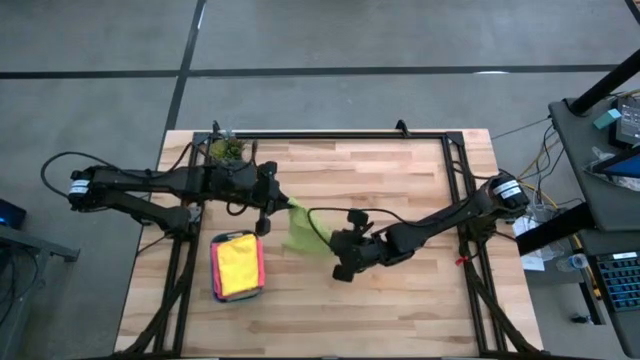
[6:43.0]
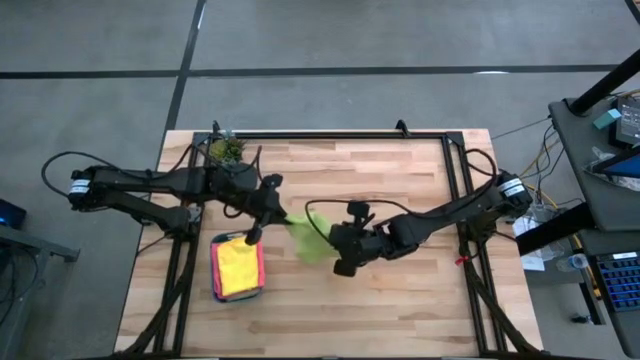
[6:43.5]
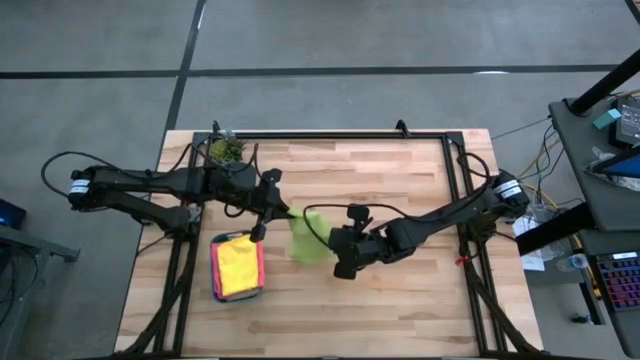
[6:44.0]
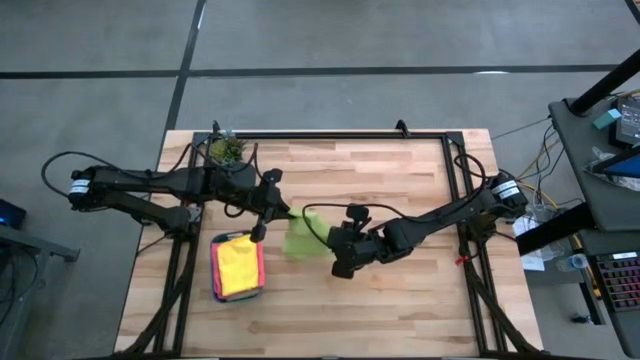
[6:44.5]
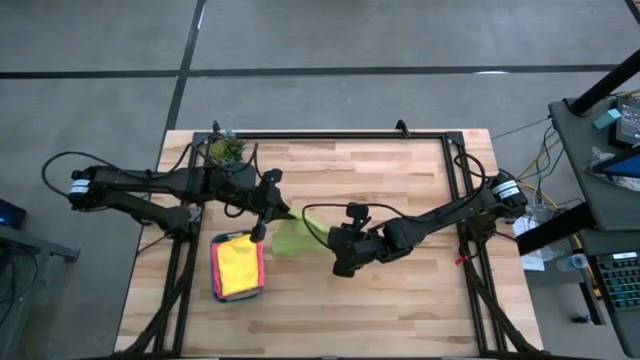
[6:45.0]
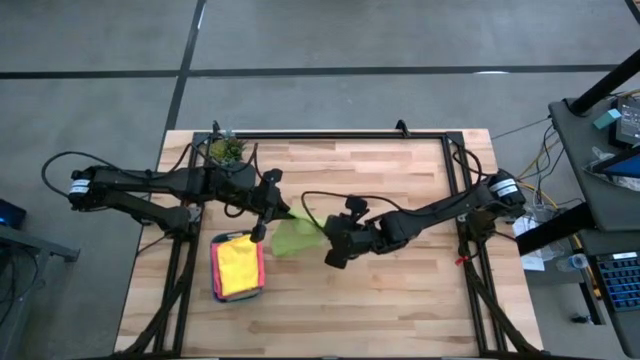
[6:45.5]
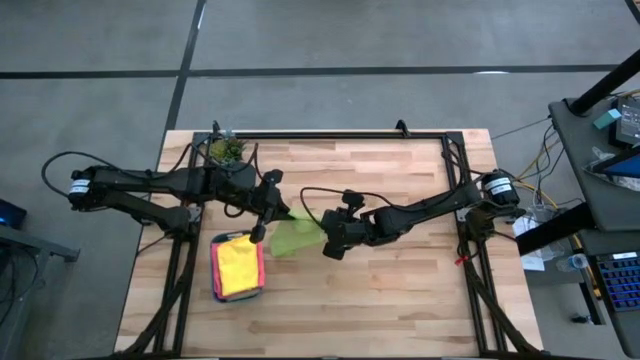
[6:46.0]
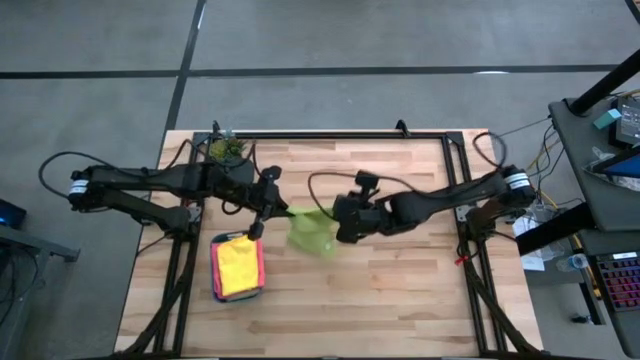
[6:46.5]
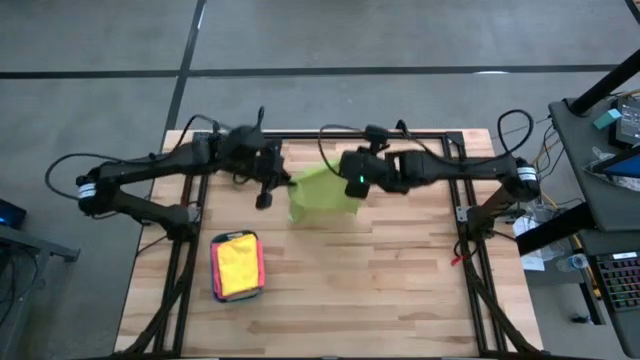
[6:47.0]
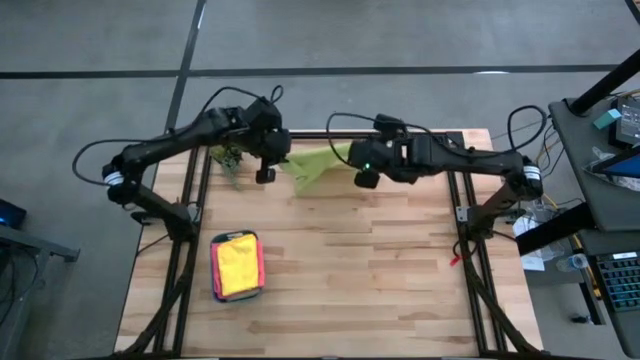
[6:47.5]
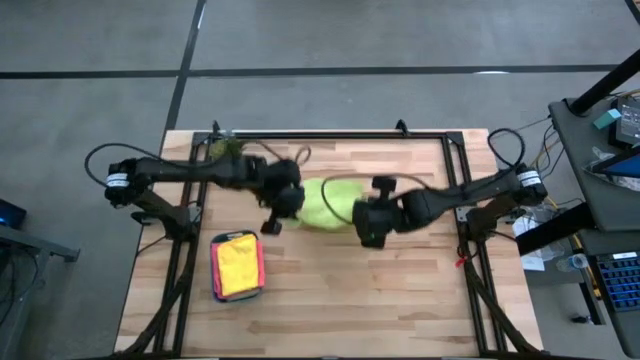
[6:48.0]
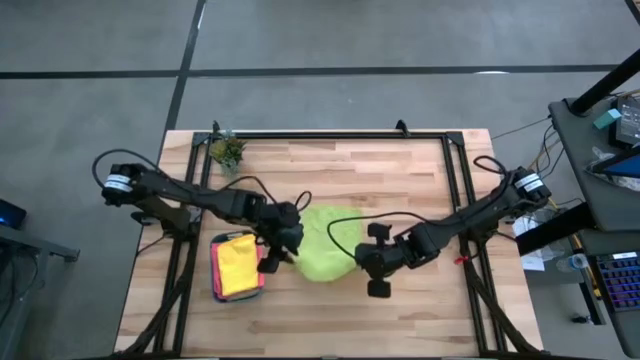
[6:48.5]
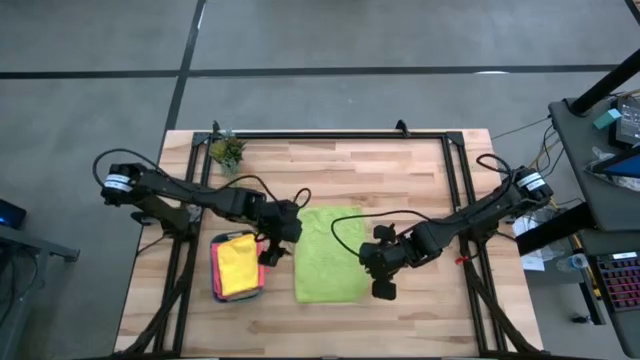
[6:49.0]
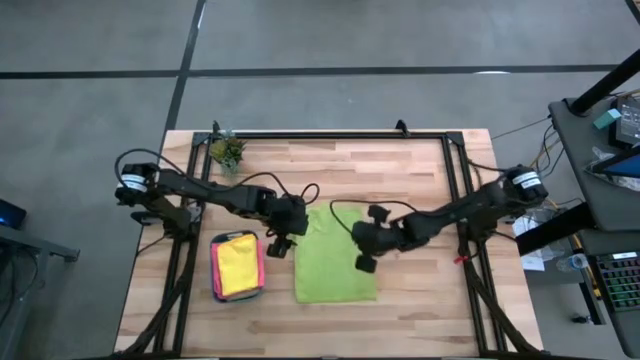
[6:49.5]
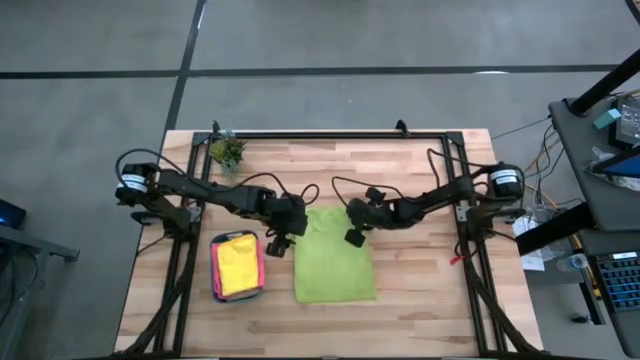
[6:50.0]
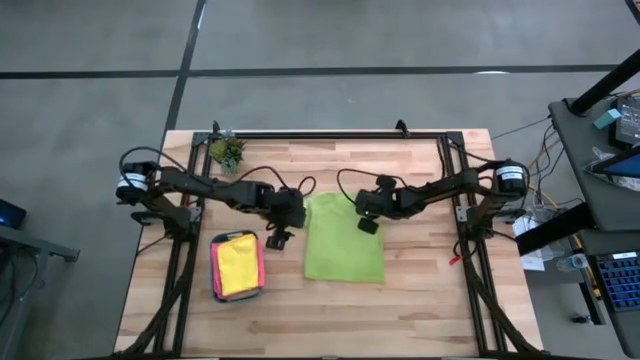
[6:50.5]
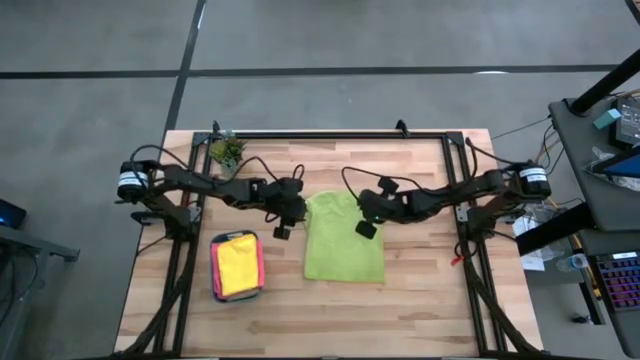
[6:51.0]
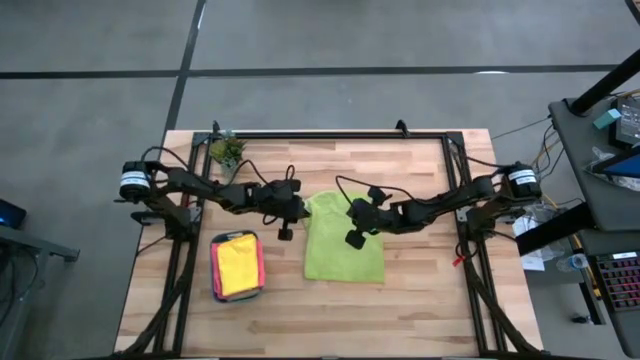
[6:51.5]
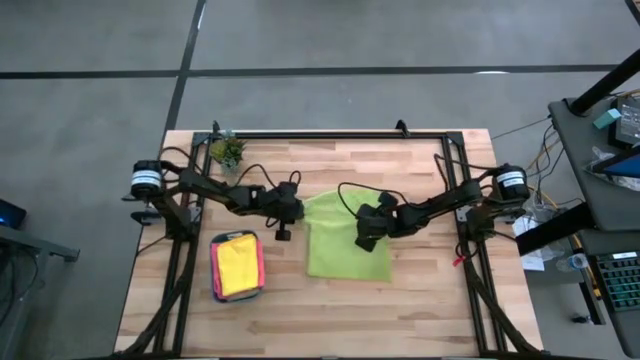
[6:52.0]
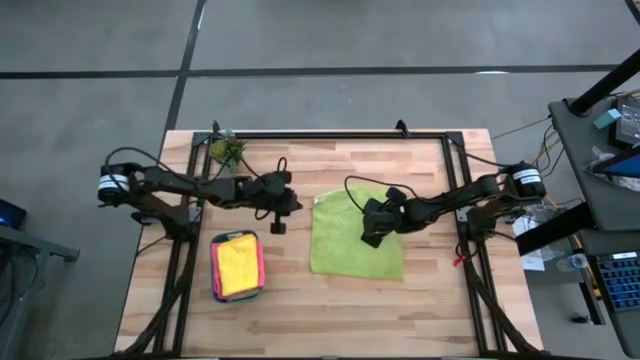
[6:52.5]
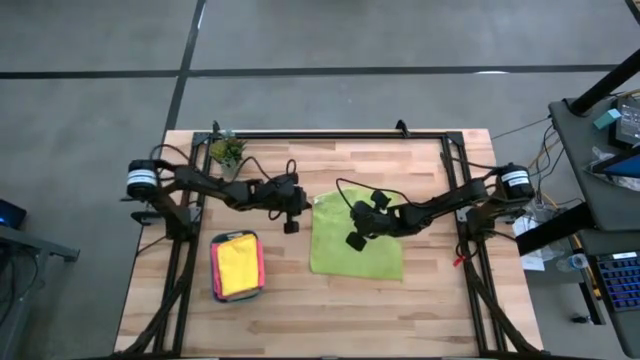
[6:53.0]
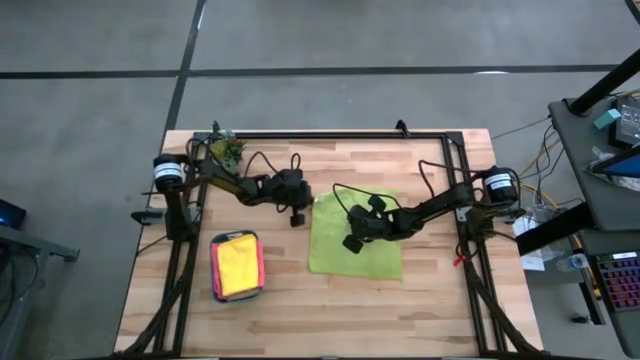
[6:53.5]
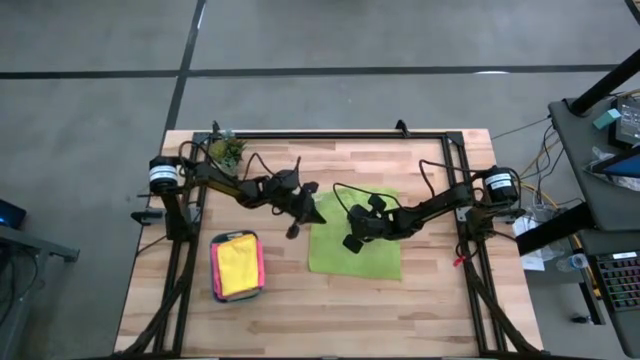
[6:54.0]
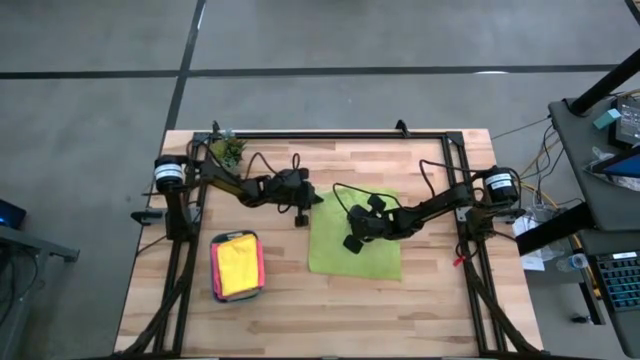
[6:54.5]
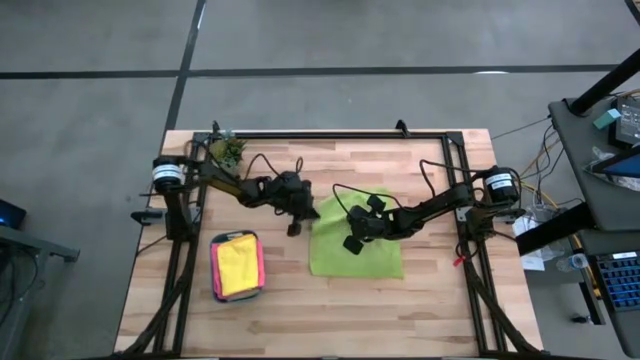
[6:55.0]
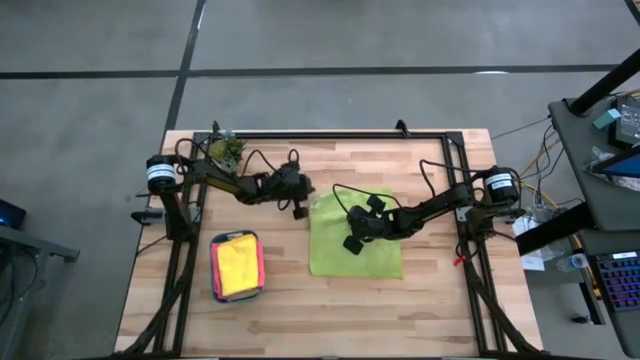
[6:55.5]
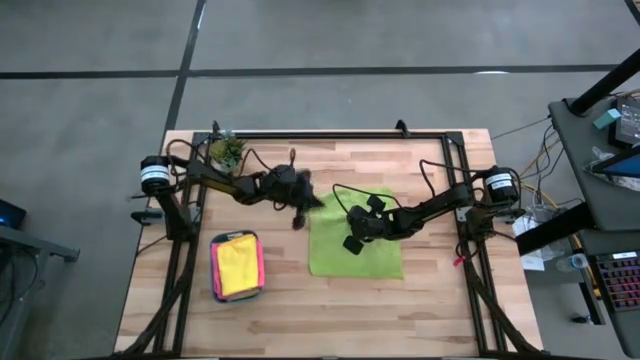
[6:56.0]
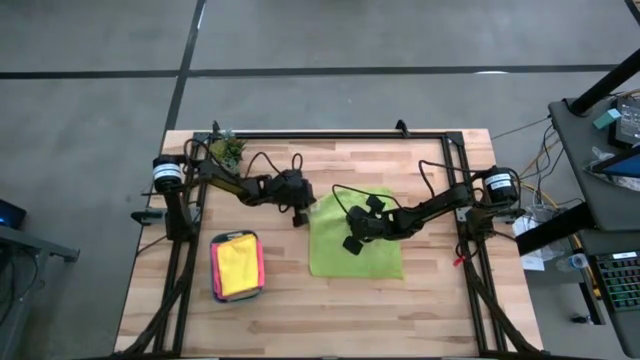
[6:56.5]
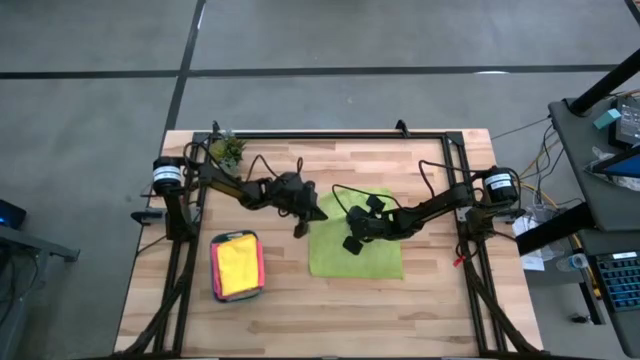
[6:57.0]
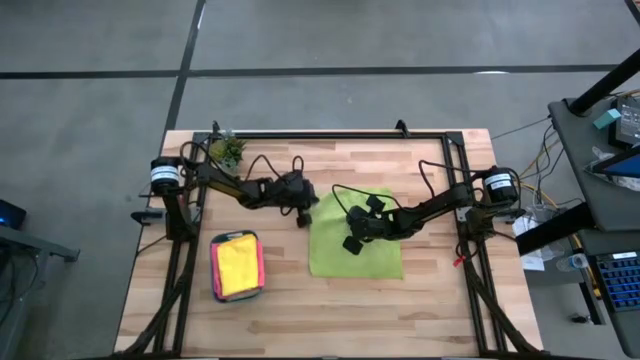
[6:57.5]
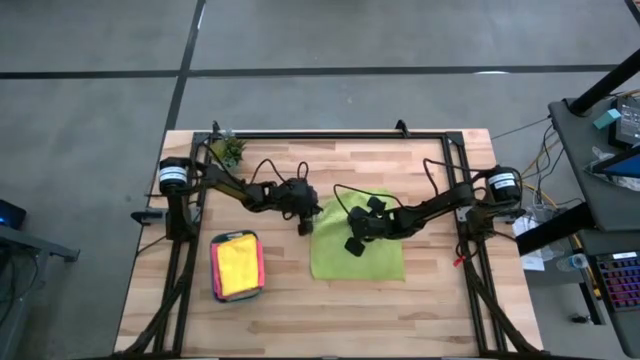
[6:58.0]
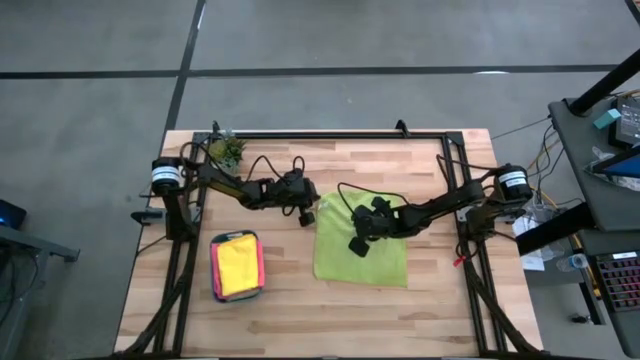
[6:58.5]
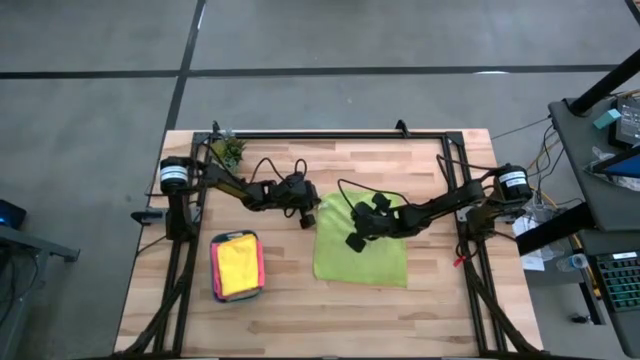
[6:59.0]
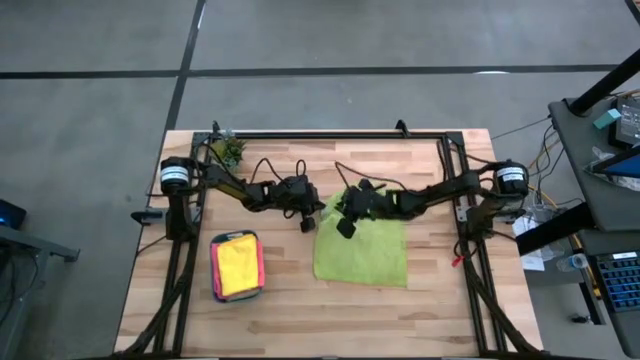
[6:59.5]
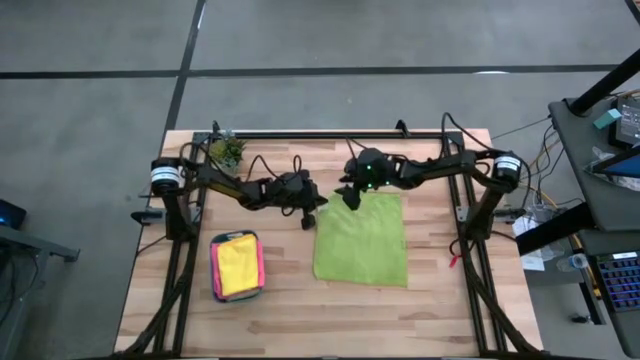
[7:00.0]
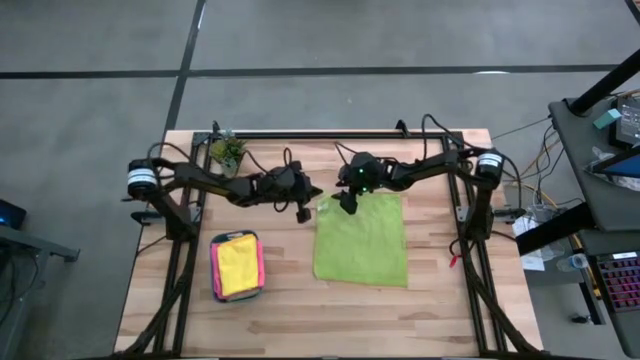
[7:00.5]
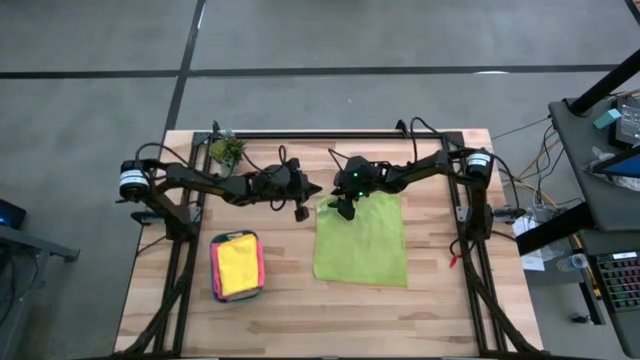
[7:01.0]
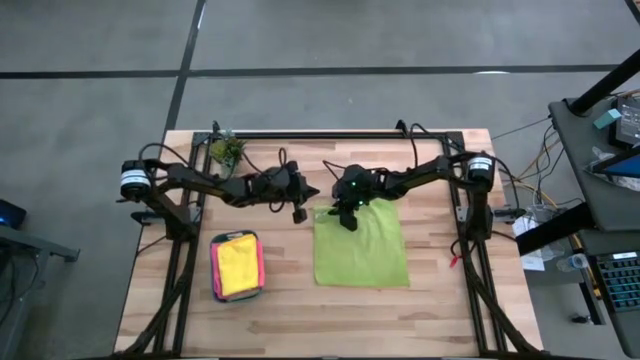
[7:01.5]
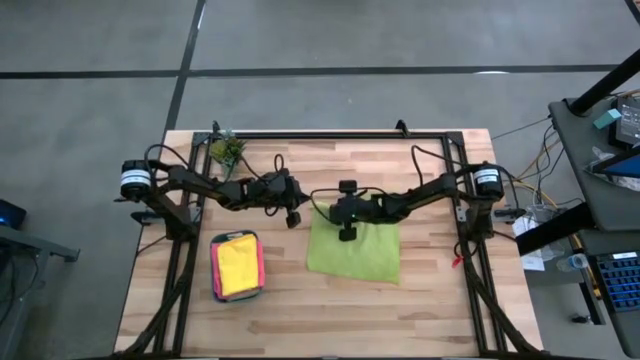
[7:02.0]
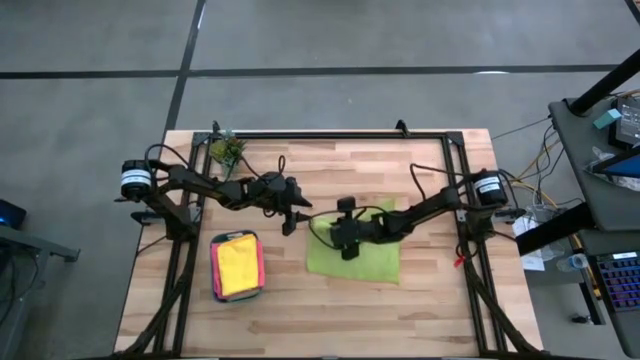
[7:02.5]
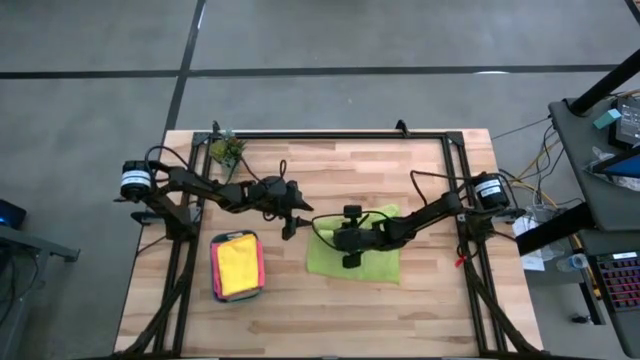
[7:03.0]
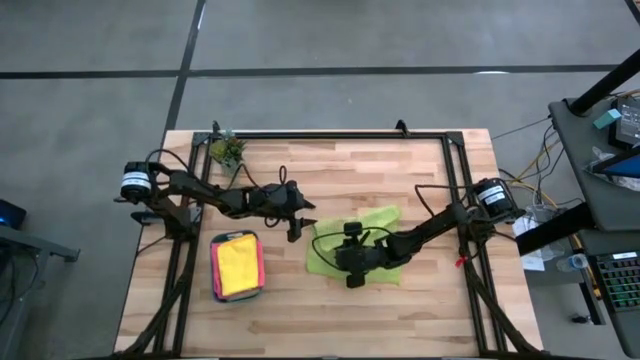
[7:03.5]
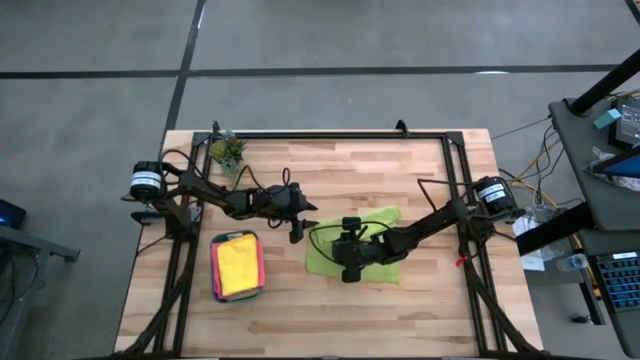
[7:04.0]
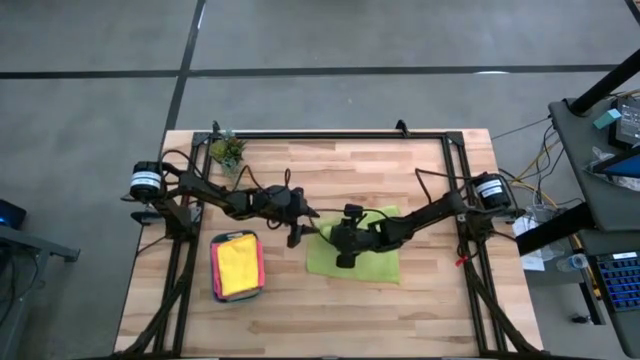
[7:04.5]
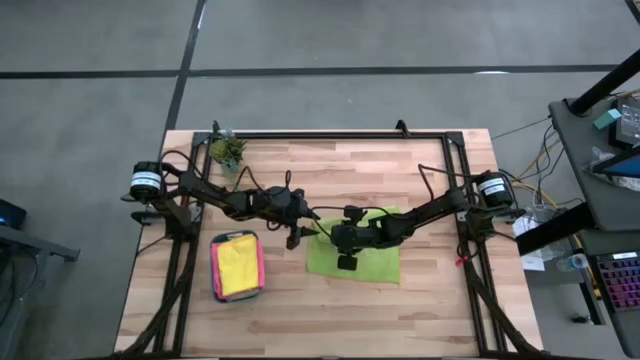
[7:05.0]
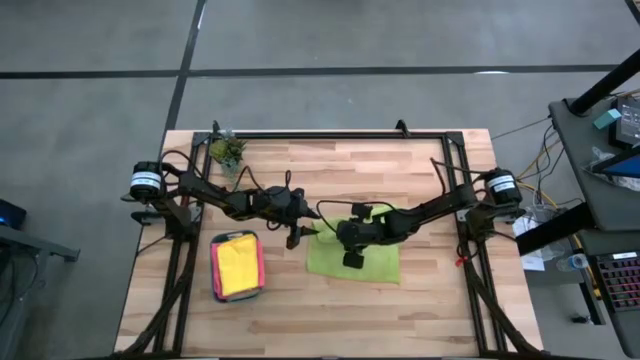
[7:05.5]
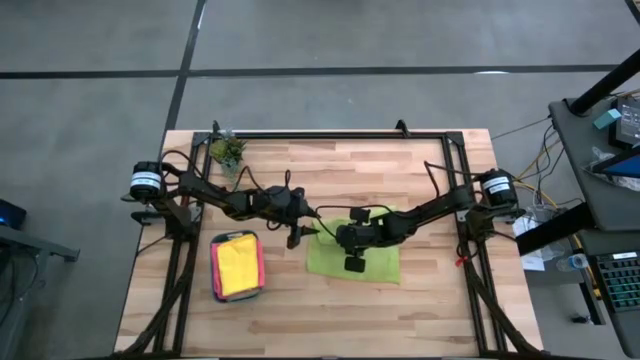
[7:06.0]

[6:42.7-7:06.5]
Task: Fold microfiber towels
Fold the green microfiber cloth
